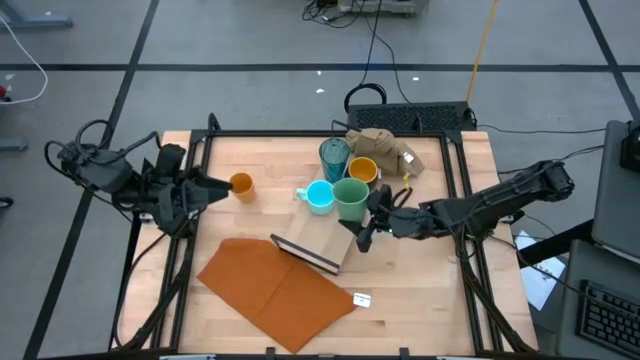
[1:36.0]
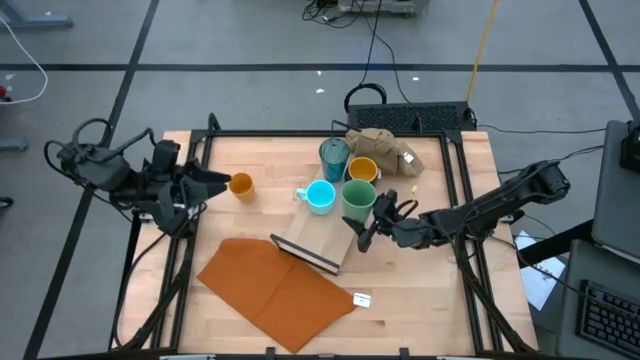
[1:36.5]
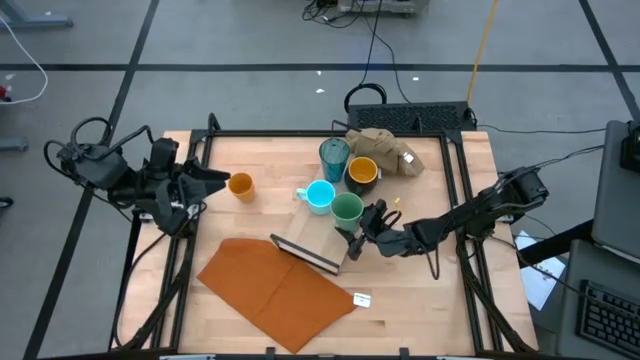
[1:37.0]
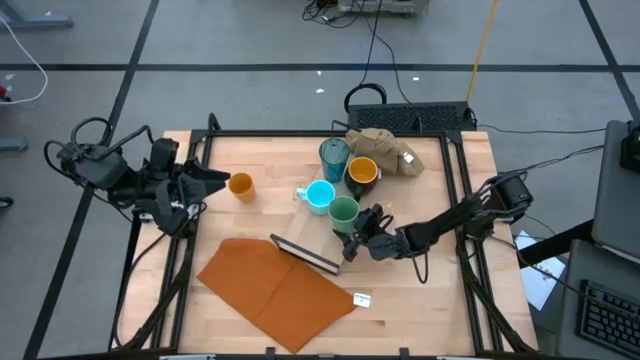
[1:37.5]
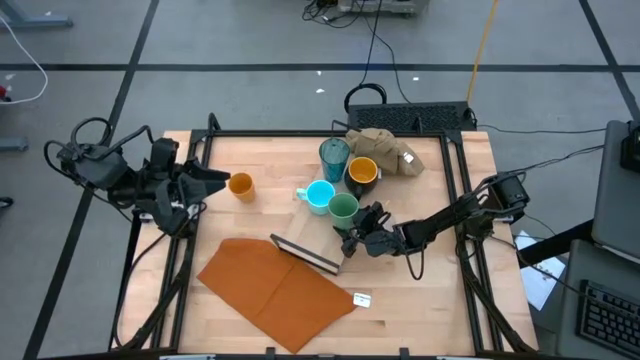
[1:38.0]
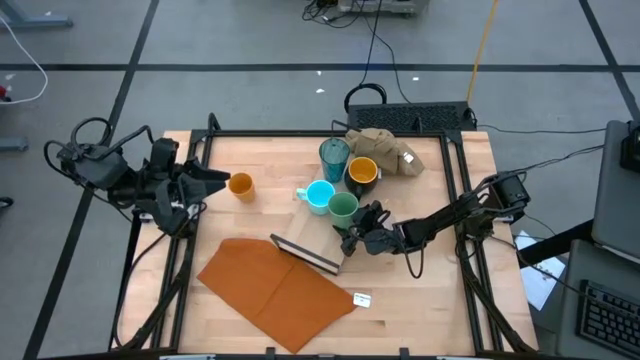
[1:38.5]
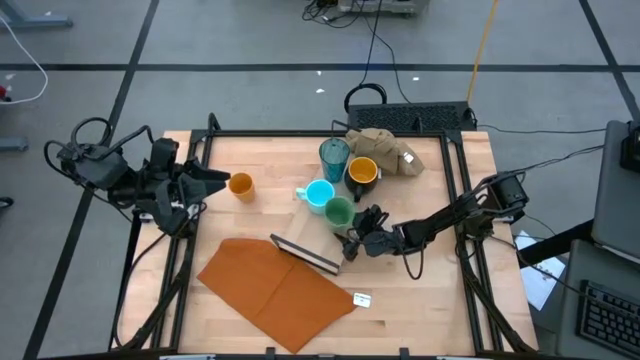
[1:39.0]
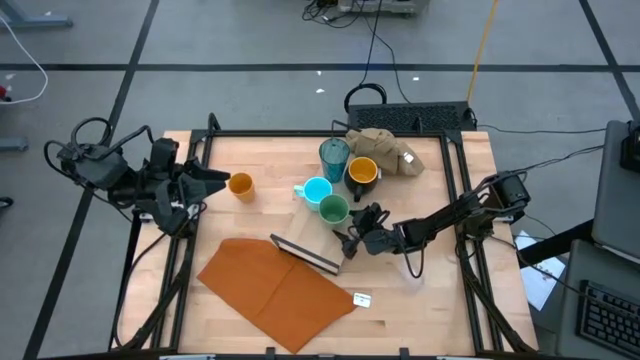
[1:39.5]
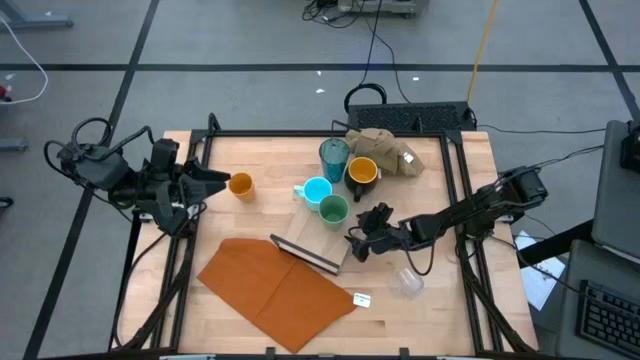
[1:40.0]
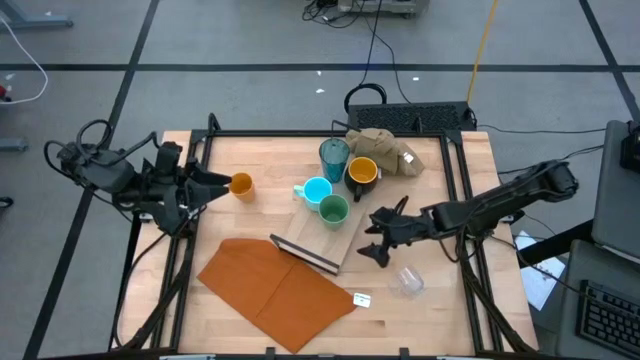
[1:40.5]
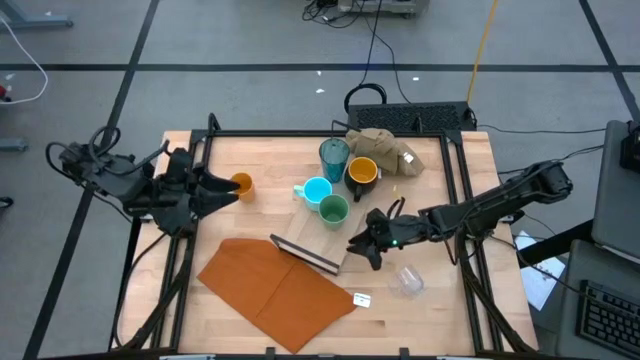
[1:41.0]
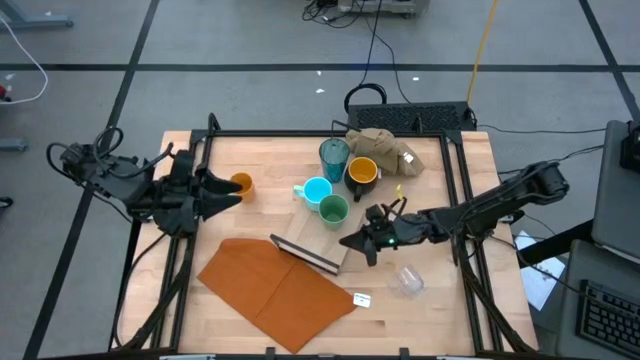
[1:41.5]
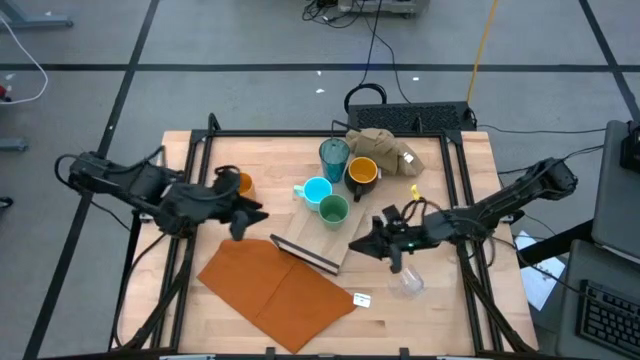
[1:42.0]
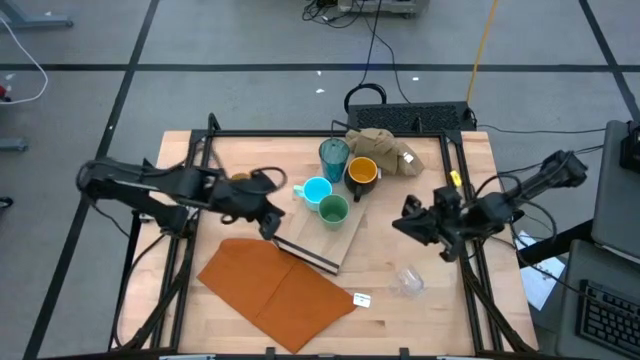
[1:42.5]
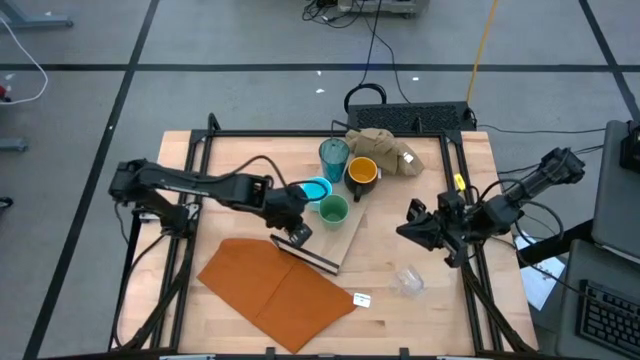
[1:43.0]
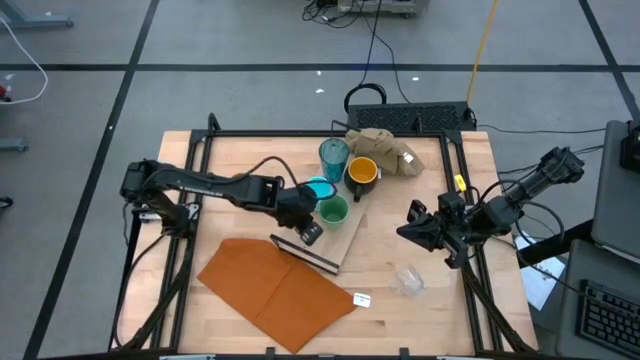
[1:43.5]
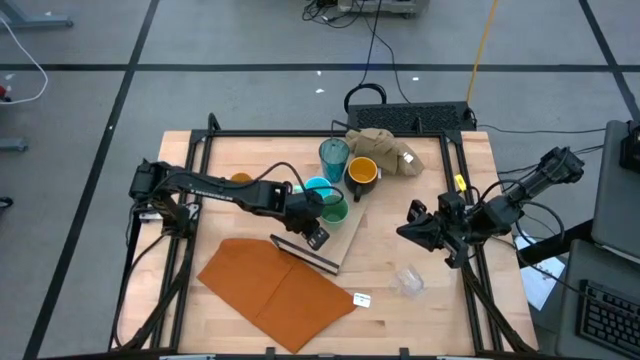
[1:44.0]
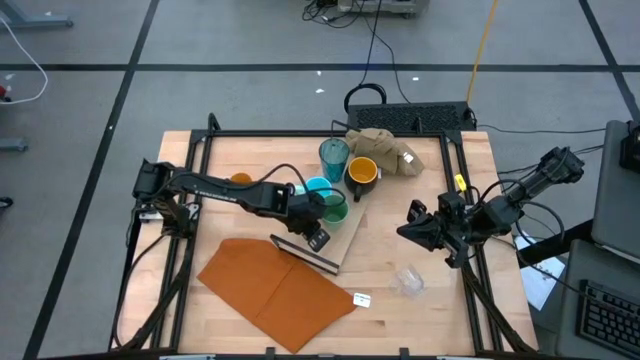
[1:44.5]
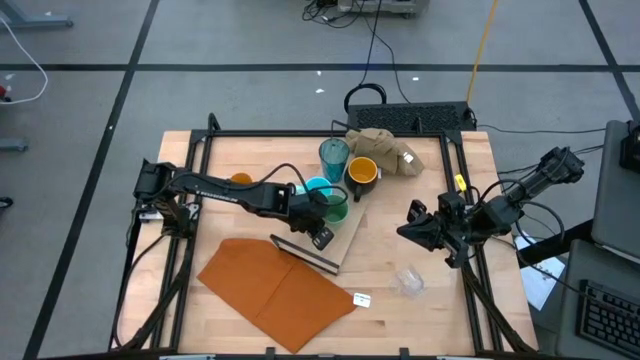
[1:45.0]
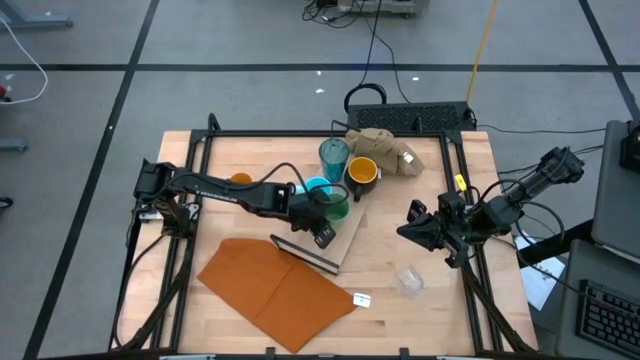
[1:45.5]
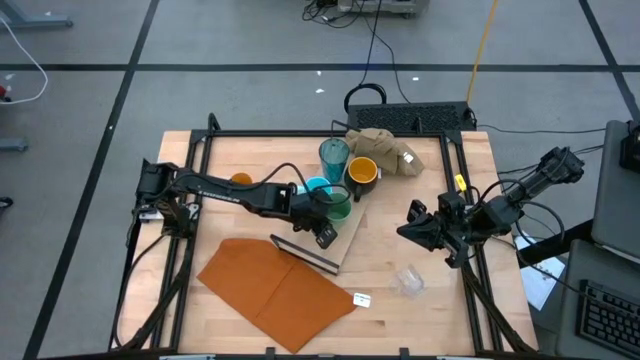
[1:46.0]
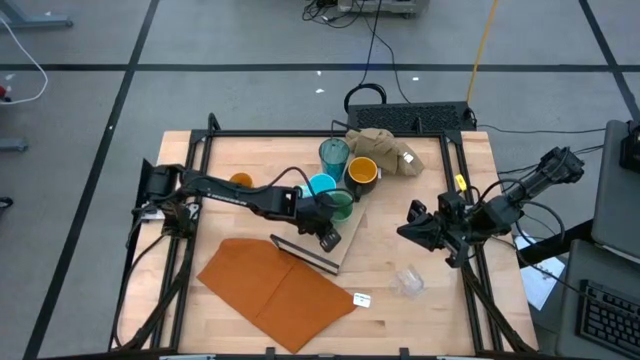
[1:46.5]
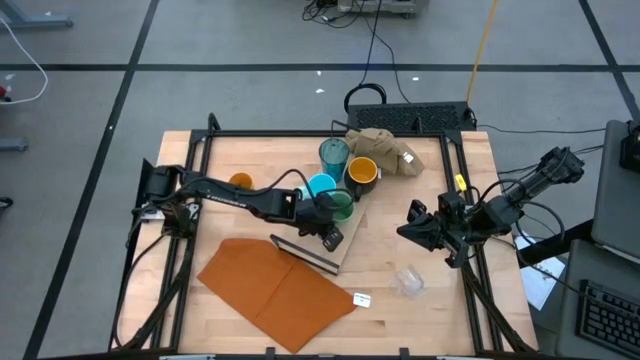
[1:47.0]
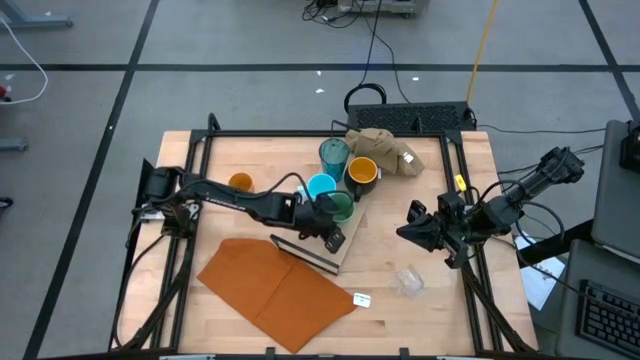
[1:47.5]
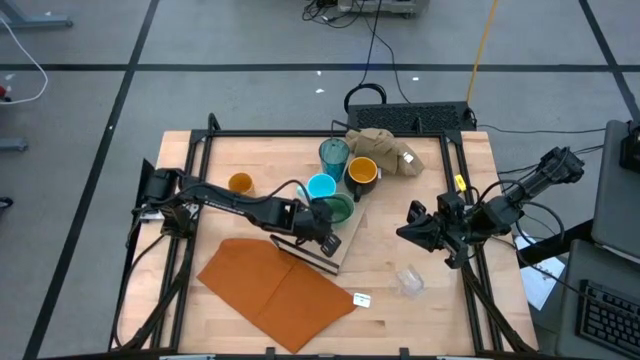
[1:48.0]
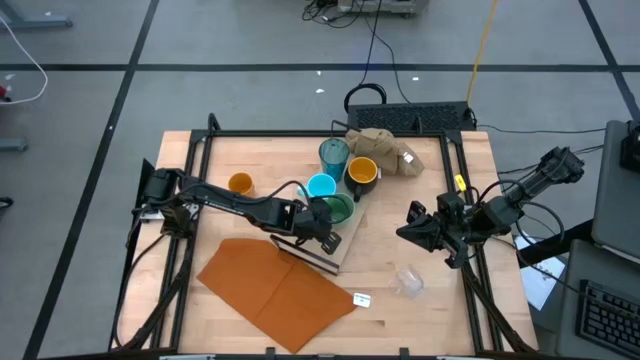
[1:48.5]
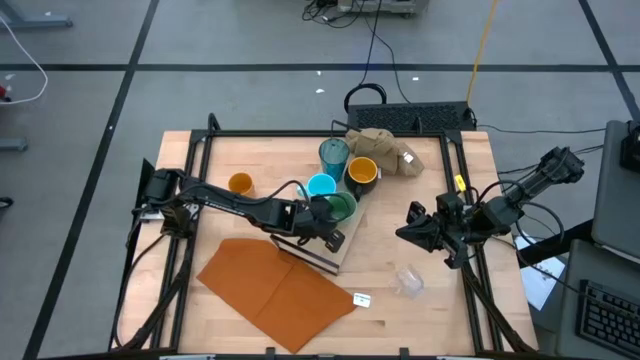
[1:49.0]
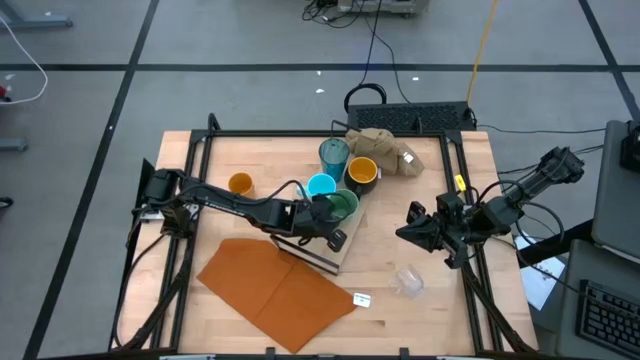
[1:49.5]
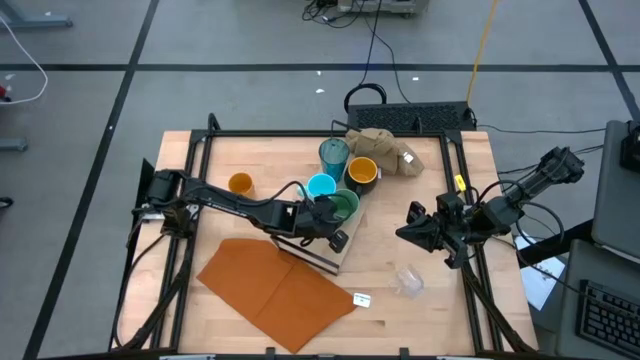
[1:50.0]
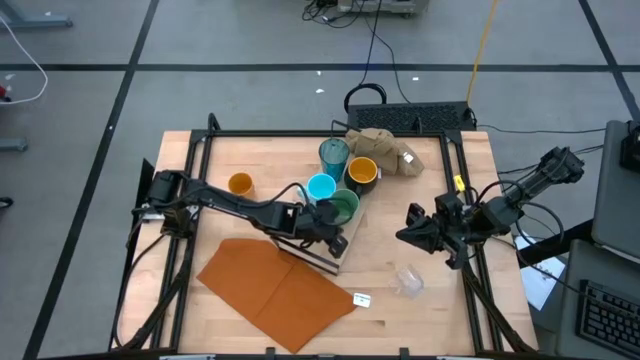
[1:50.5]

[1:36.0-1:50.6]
Task: Stack small to large cups/mugs on shelf
Put the light green cup on the shelf

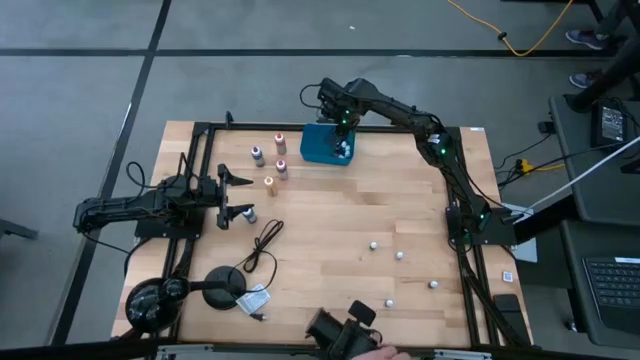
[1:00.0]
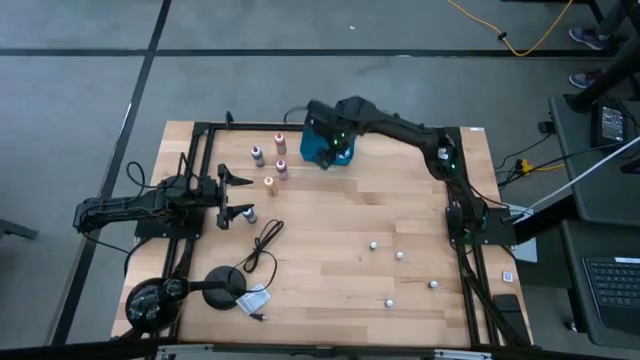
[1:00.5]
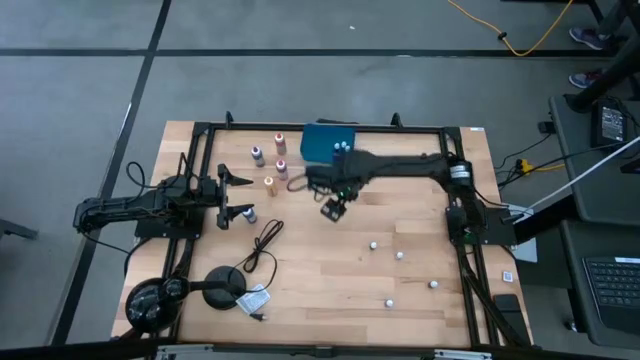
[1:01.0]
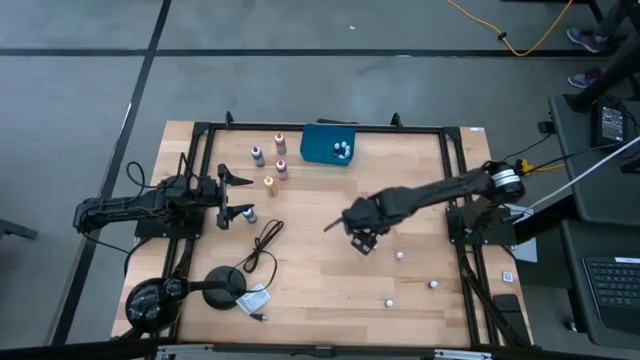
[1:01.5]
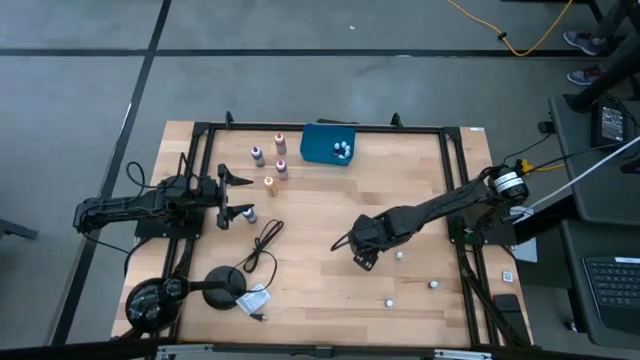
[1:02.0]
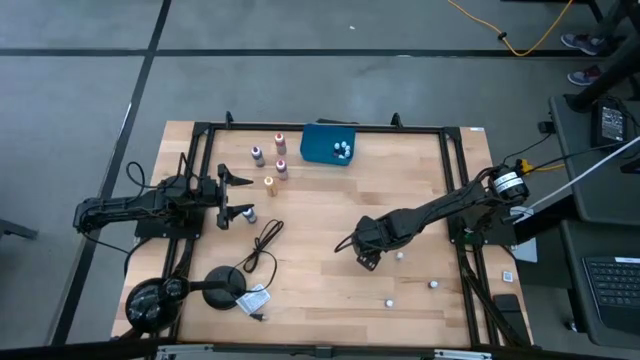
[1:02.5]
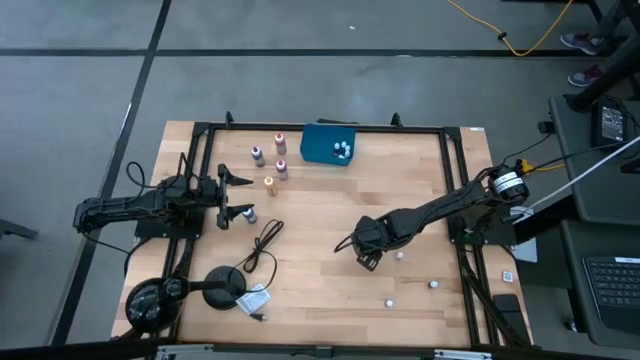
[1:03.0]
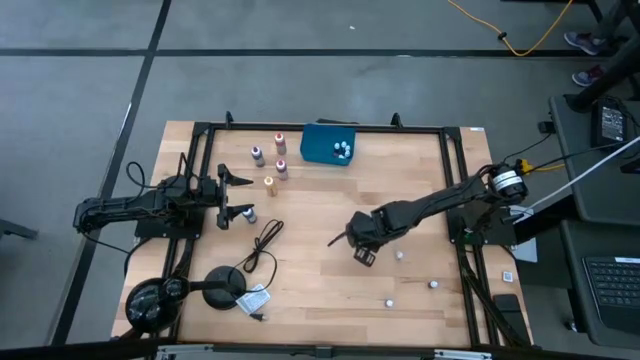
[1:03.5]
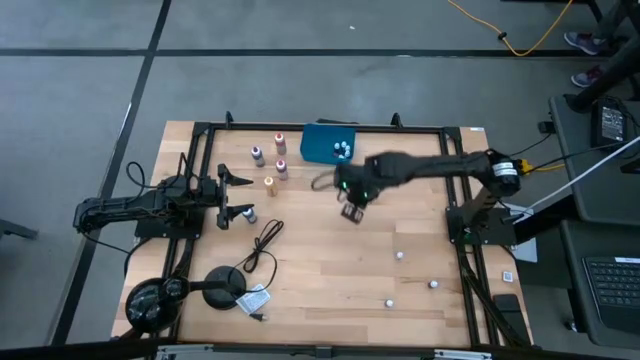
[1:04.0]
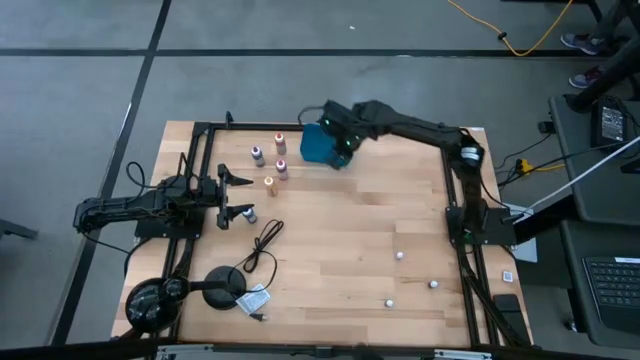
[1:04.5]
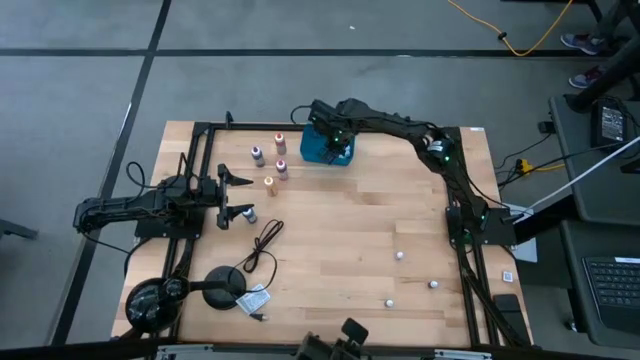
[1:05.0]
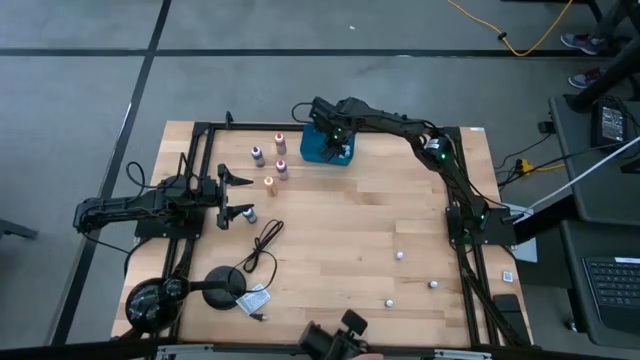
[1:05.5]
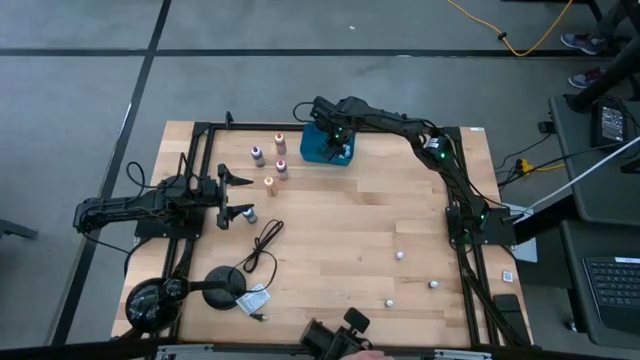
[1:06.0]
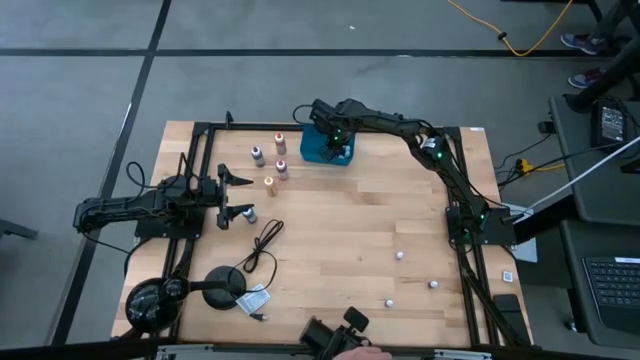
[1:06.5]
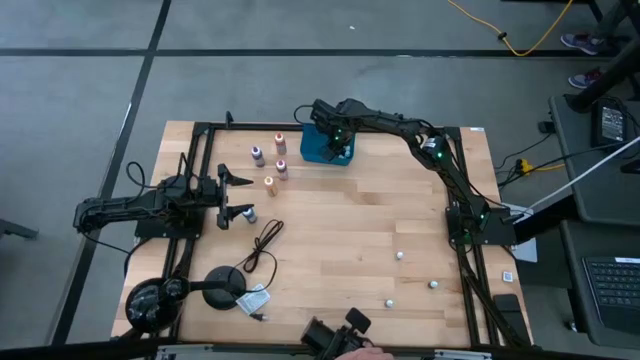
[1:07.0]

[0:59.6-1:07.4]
Task: Pick & Place food coloring
Put the small red food coloring bottle into the blue container
